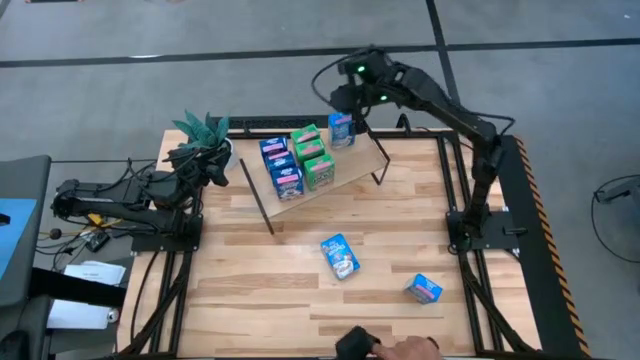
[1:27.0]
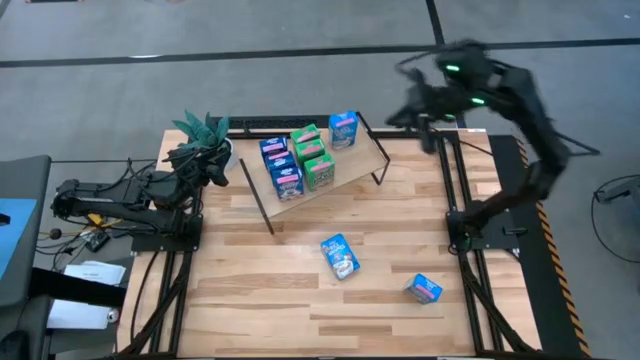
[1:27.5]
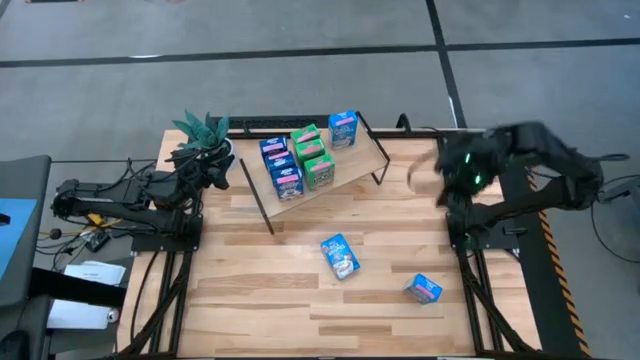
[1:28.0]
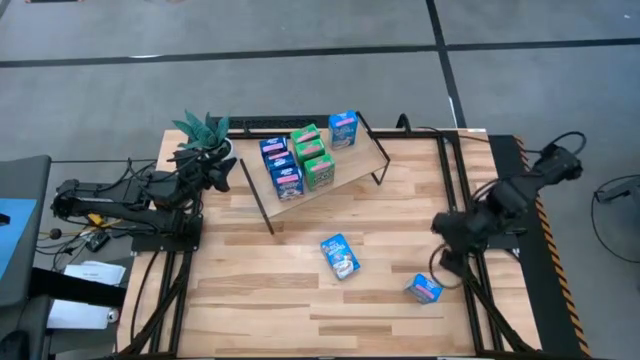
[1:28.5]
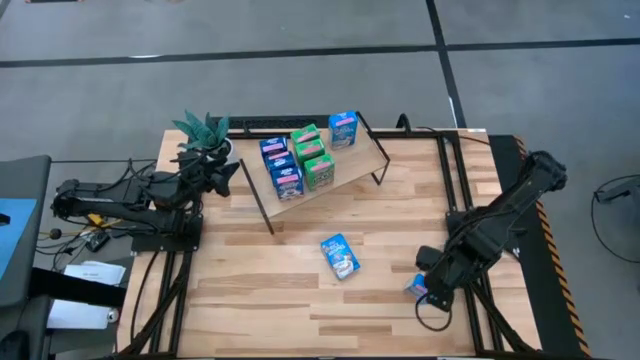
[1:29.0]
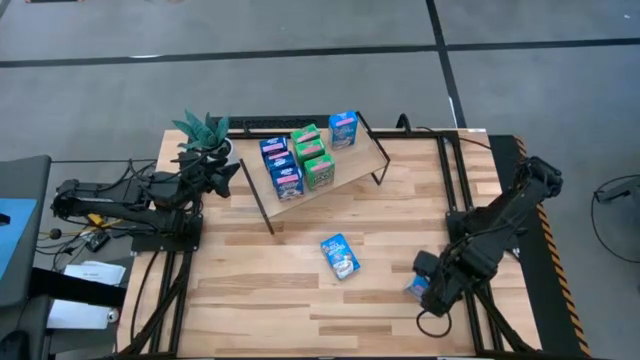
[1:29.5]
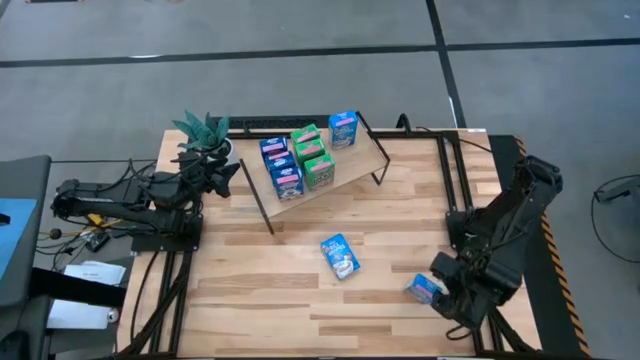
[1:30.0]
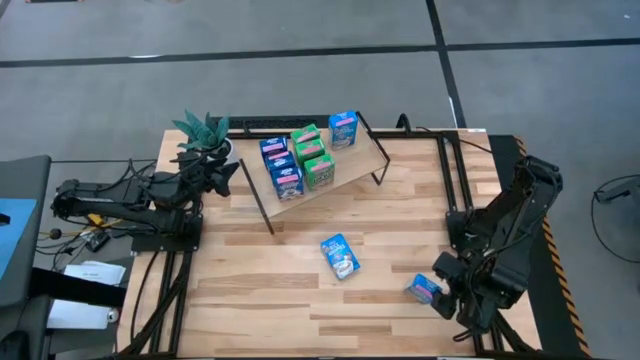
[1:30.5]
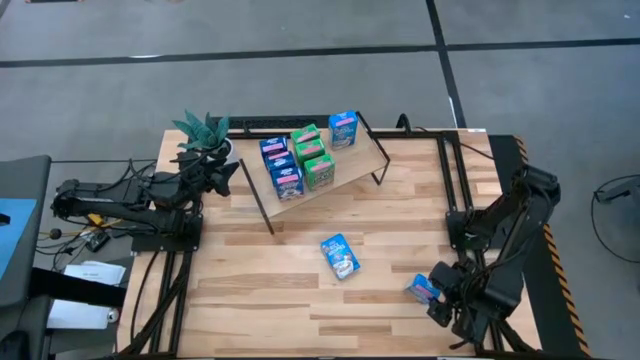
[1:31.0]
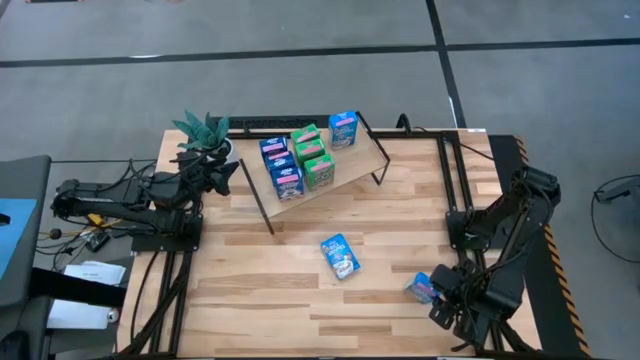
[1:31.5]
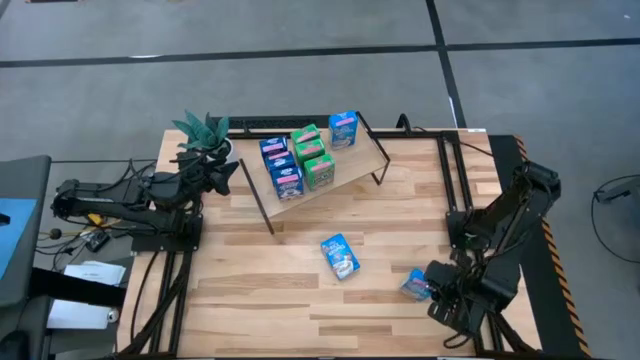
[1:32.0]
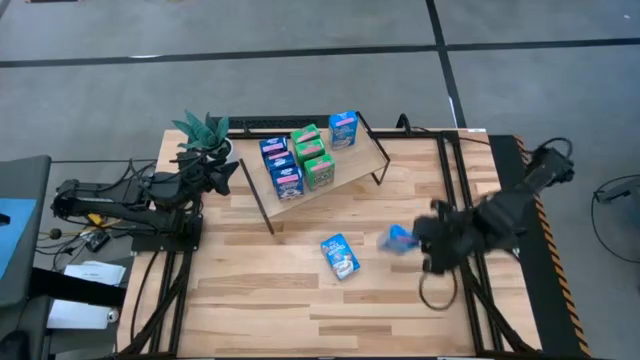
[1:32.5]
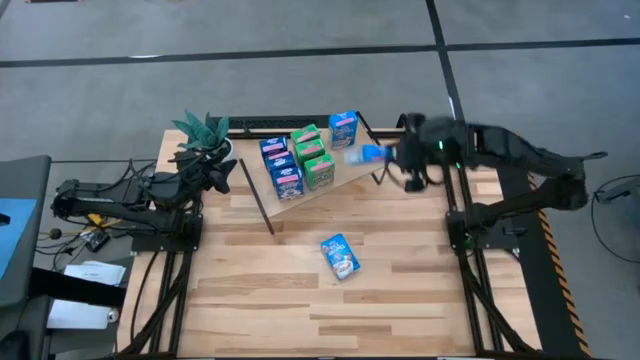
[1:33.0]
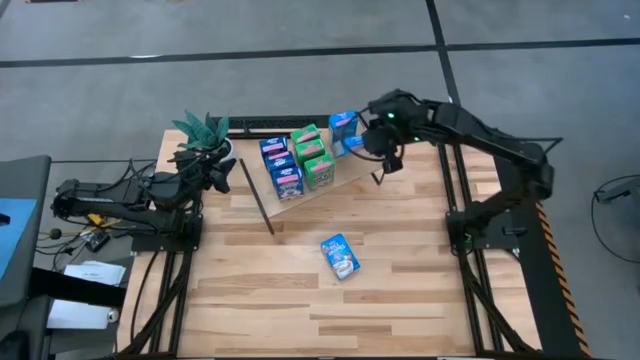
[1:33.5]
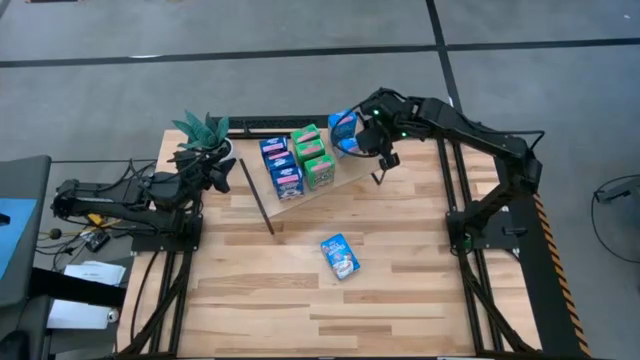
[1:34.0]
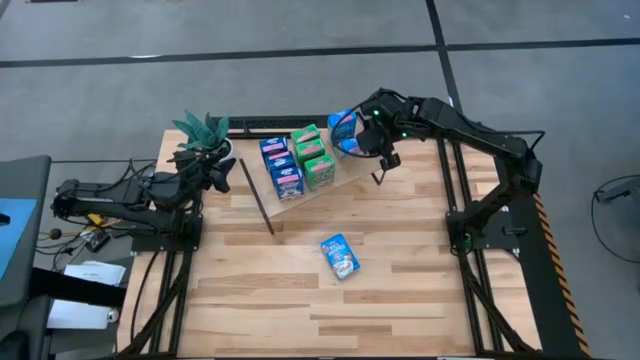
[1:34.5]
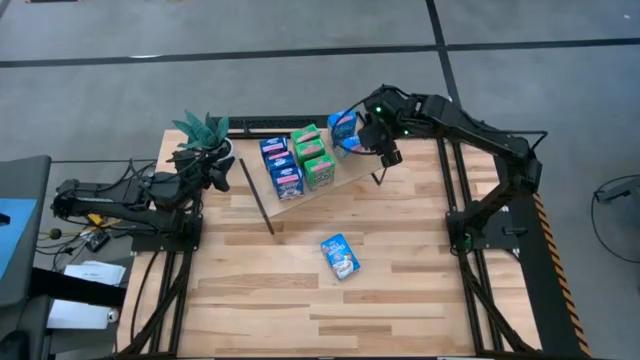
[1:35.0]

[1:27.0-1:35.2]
Task: Stack cereal on shelf
Put the right light blue cereal box on the shelf and align it with the other light blue cereal box

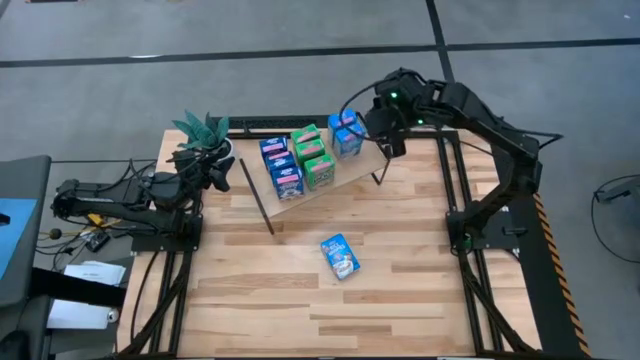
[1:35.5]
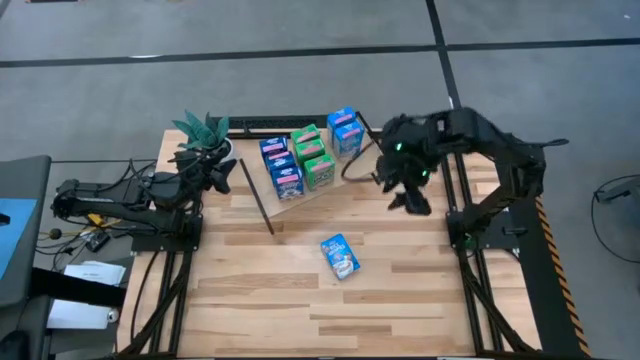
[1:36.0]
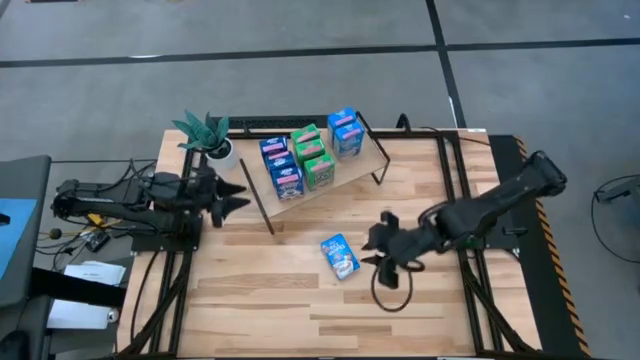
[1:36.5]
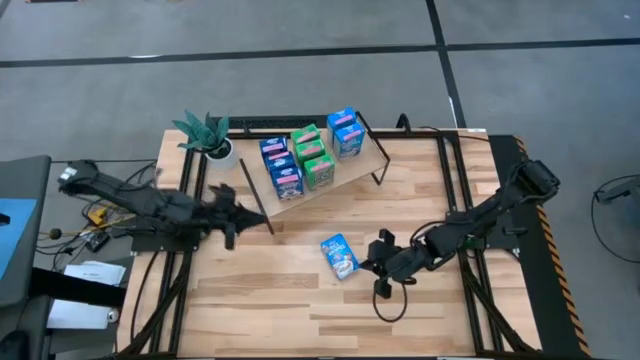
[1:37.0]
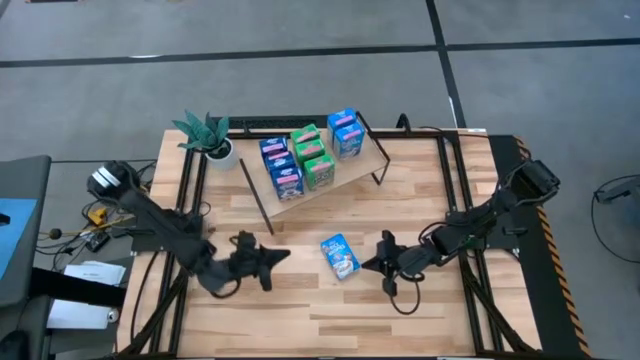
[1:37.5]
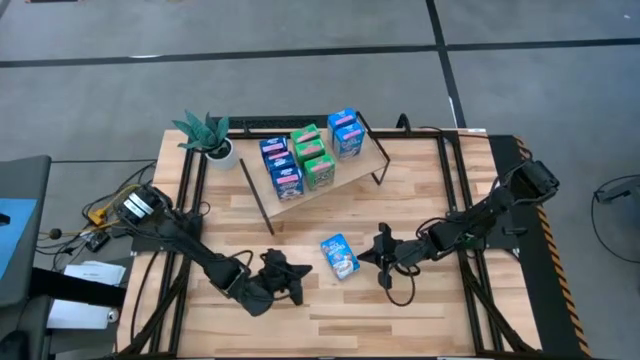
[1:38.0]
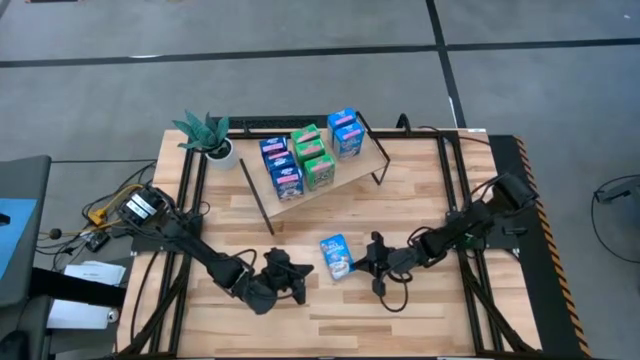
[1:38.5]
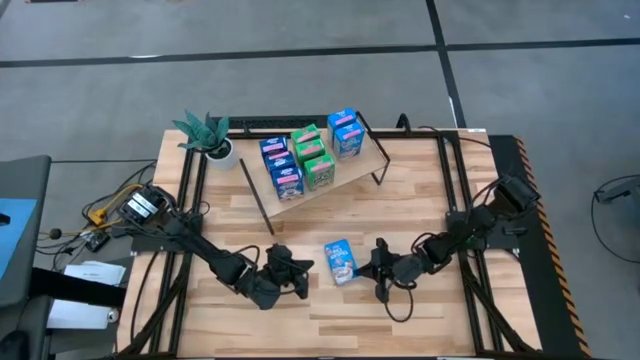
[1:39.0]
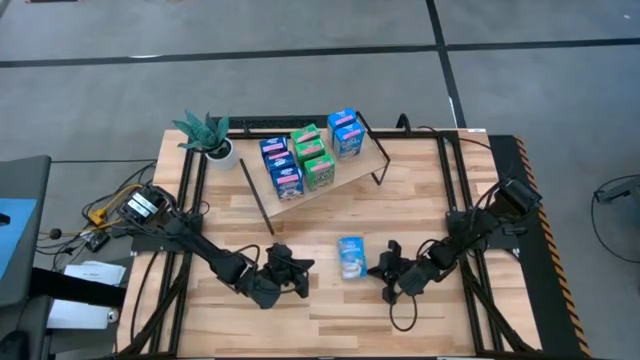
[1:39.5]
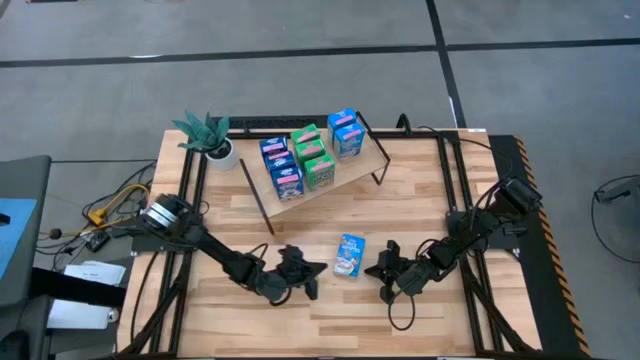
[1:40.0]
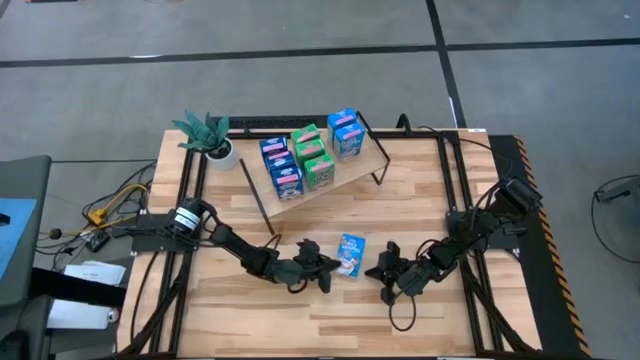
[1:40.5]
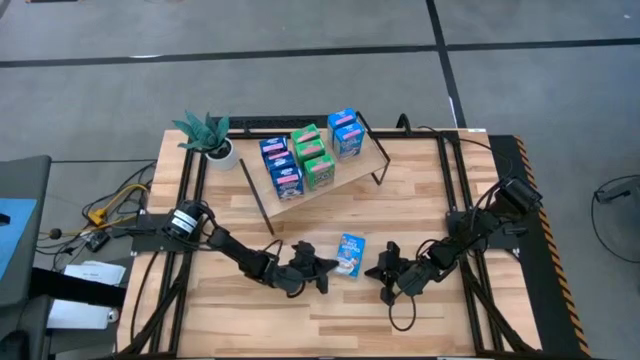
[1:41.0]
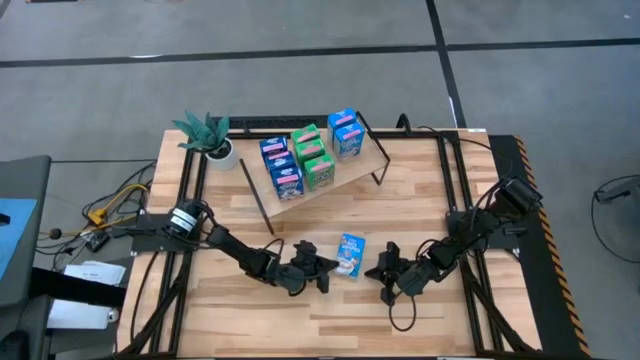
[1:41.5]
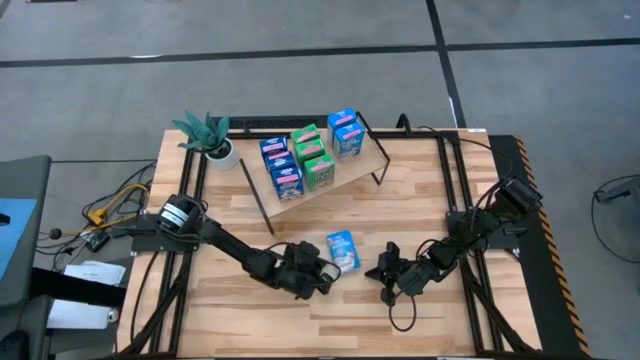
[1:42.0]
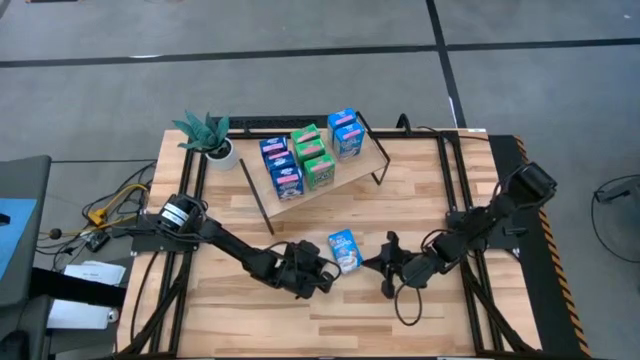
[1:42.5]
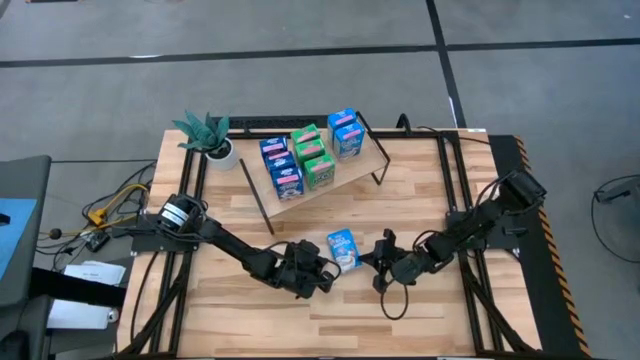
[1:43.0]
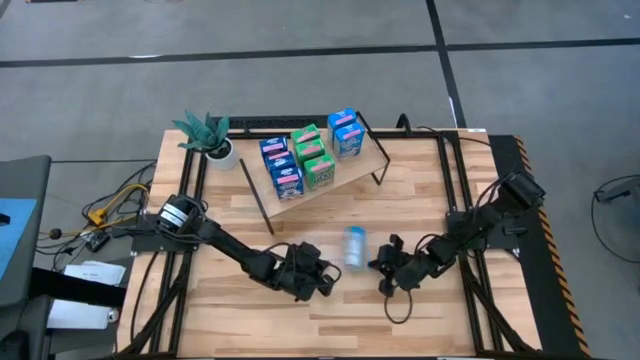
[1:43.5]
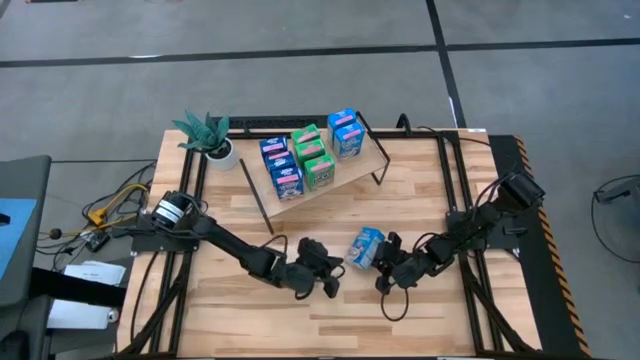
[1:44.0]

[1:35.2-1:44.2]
Put the light blue cereal box on the shelf and align it with the other light blue cereal boxes

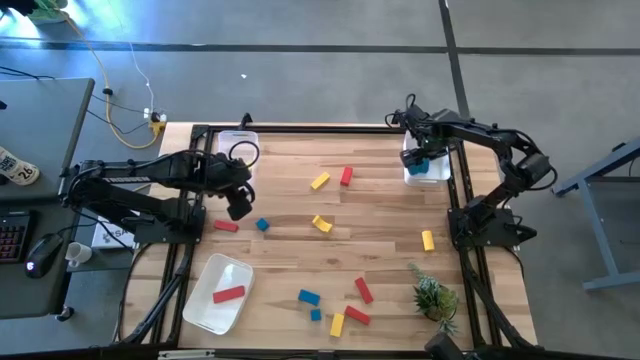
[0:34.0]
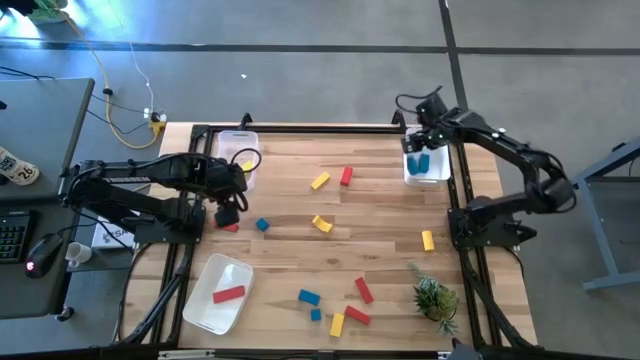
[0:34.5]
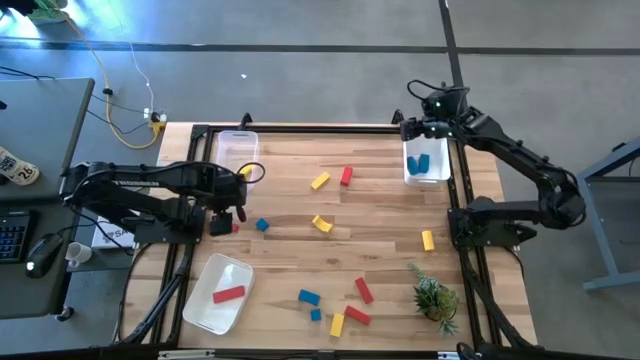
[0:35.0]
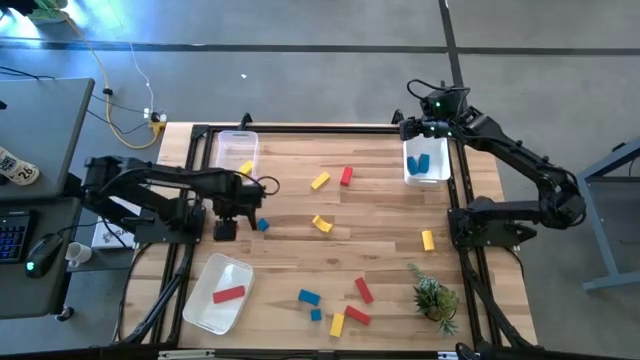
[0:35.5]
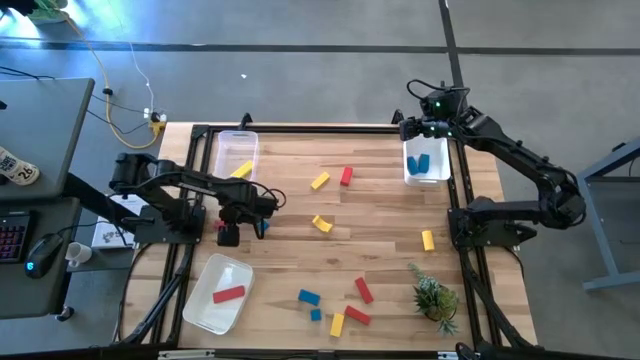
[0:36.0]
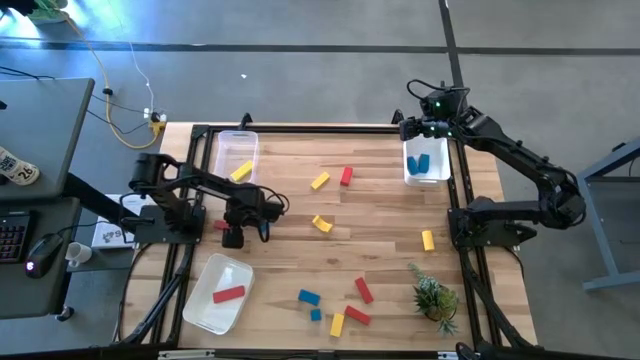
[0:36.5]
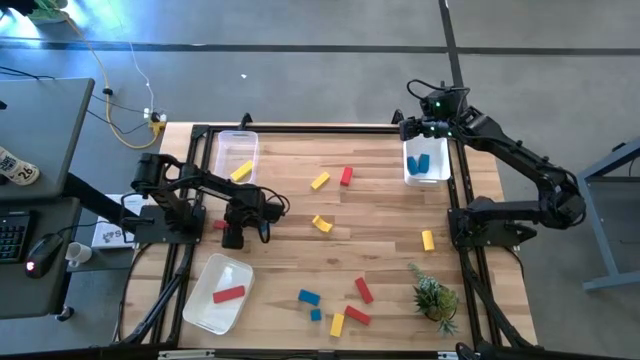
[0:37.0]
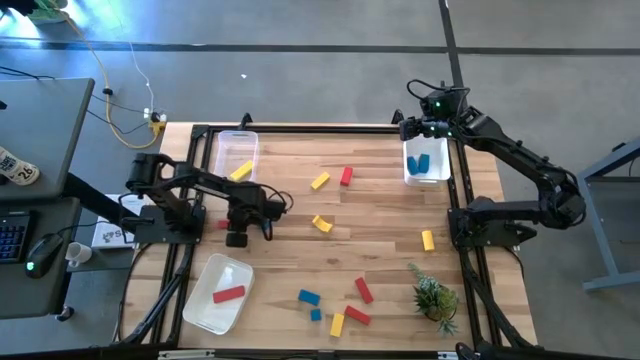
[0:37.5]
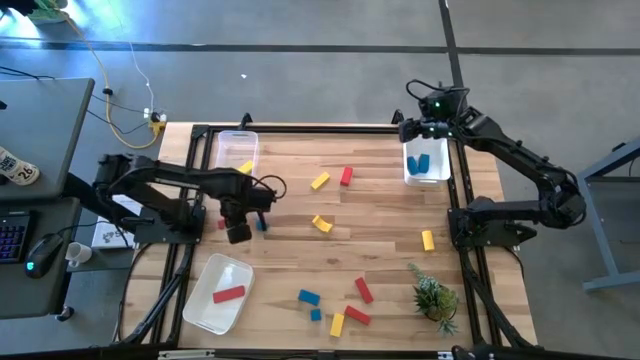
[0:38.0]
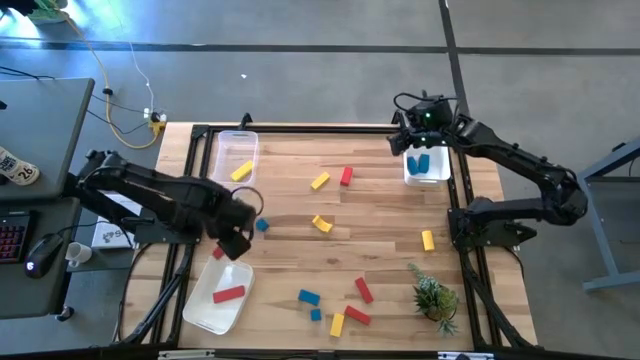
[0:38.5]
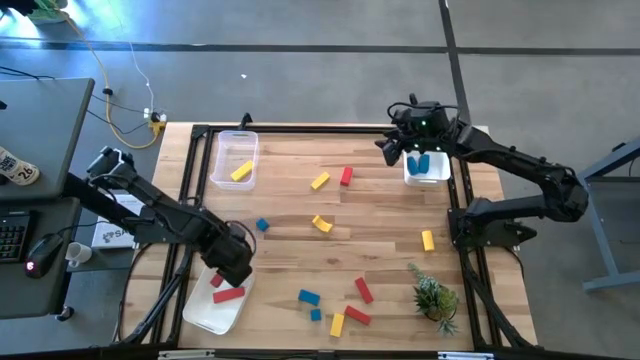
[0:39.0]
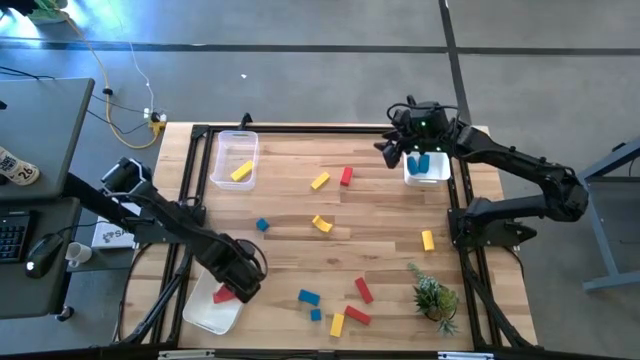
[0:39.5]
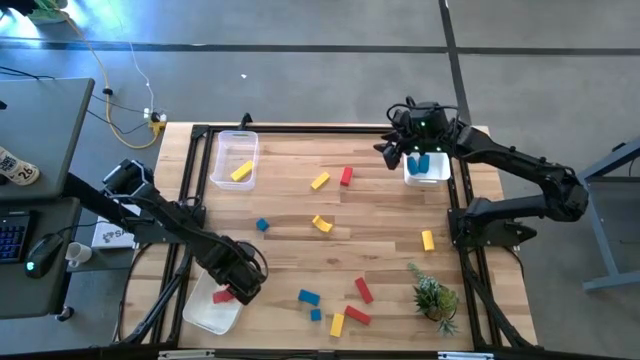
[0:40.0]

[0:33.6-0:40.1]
Task: Sort & place blocks by color
Put the red block into the bottom white bin
